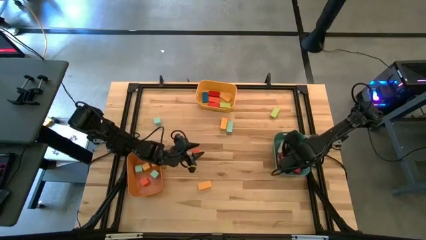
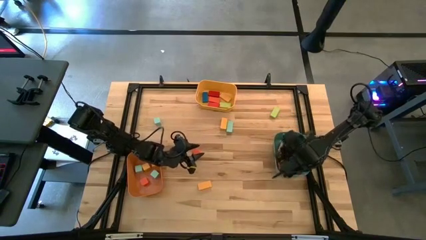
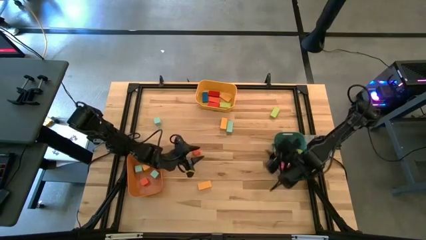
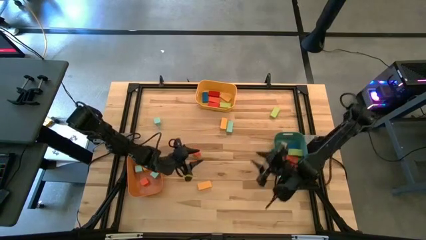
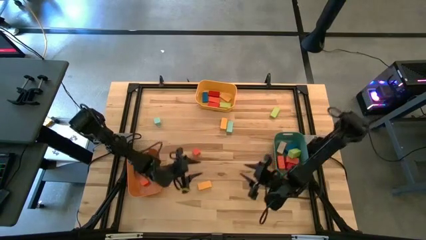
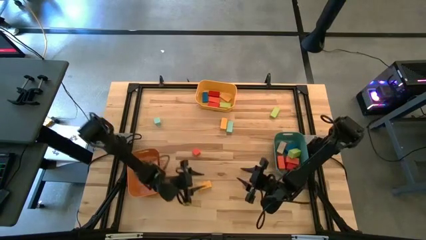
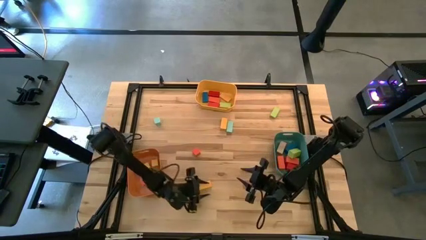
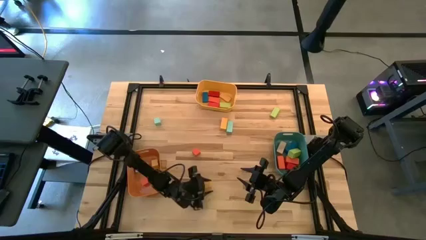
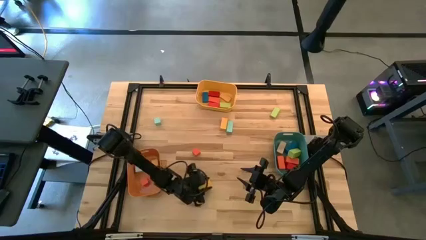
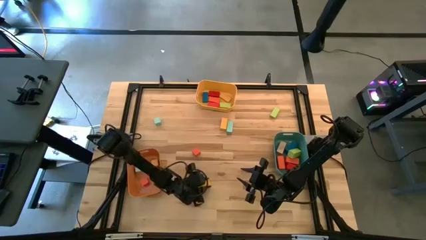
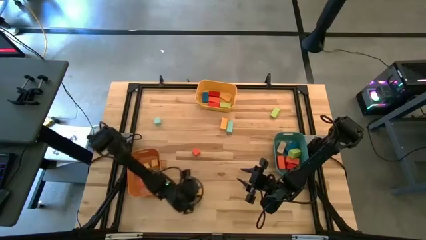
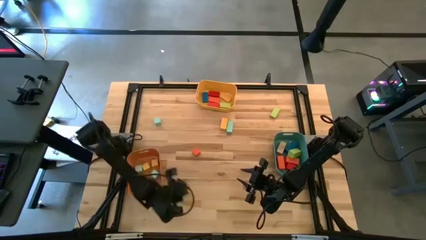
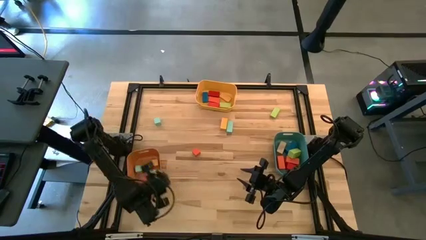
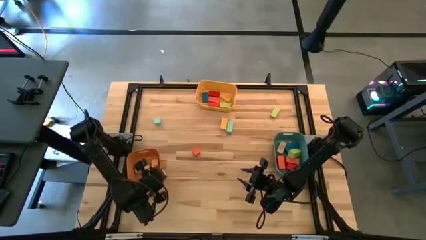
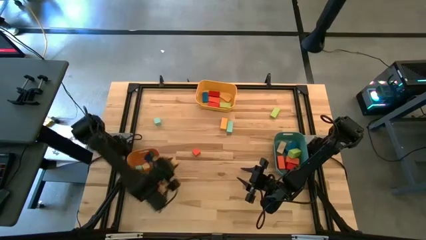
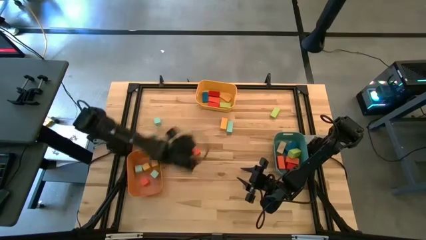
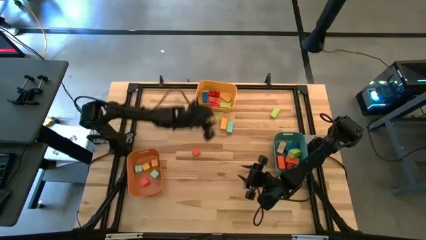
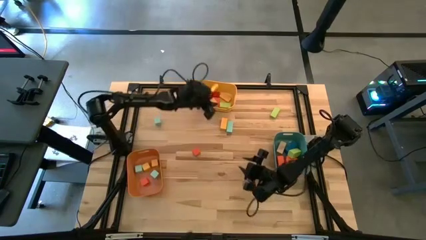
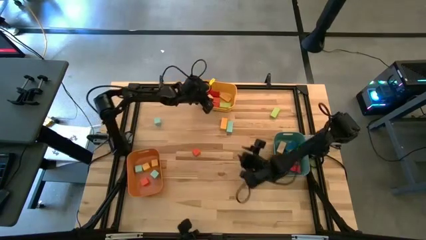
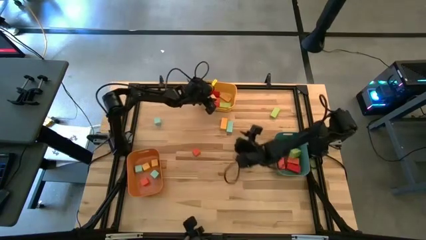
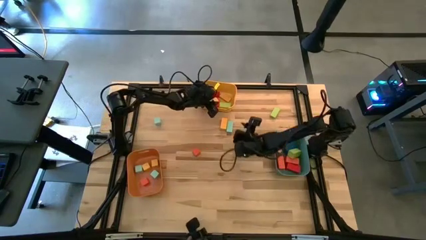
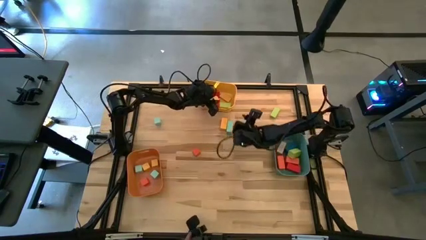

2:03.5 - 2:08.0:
Task: Sort blocks by size
Put the thin yellow rectangular block into the yellow bin

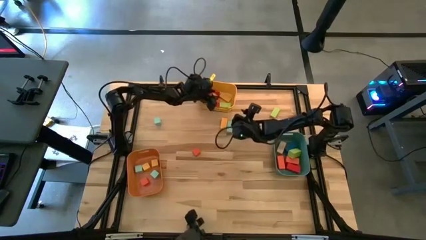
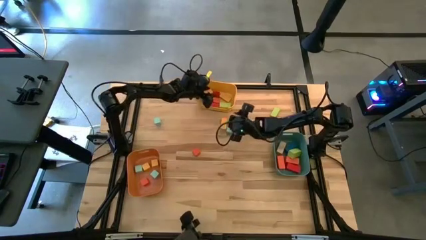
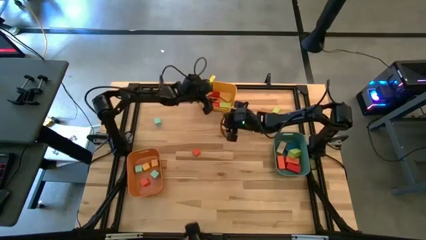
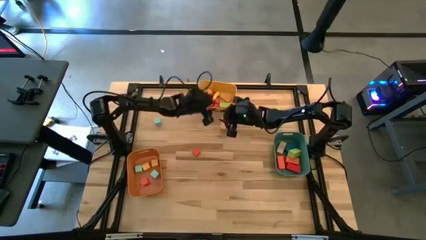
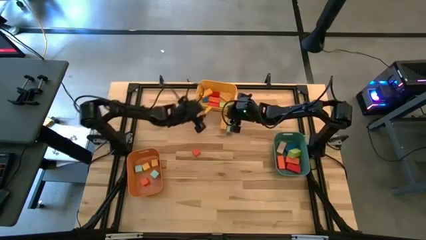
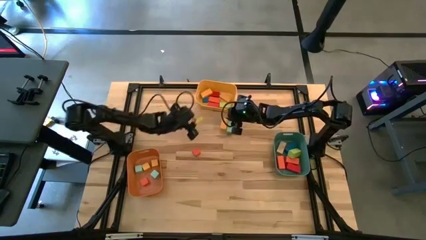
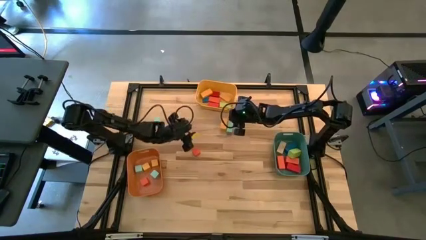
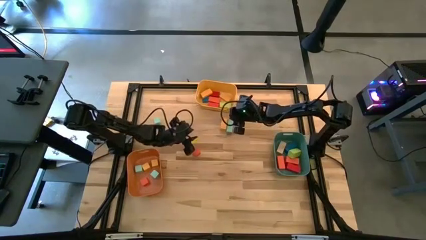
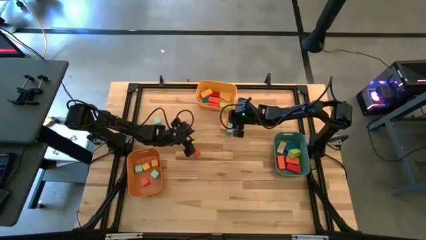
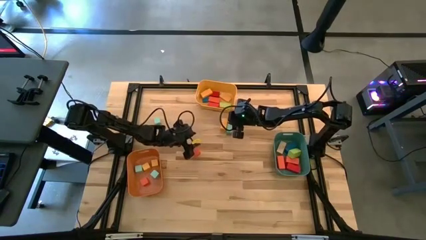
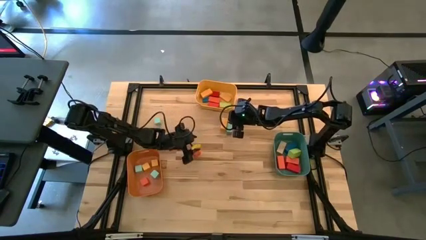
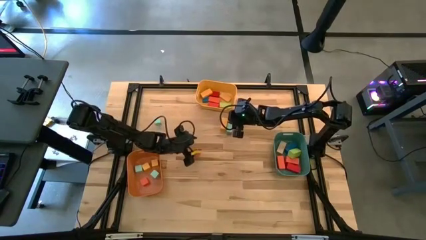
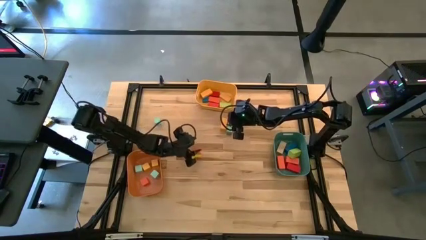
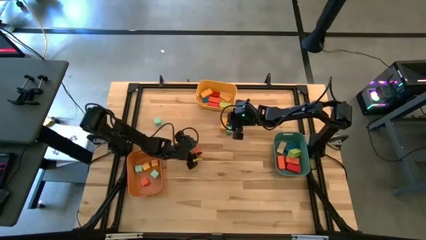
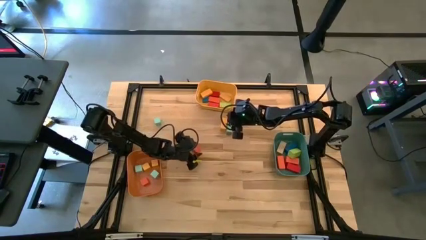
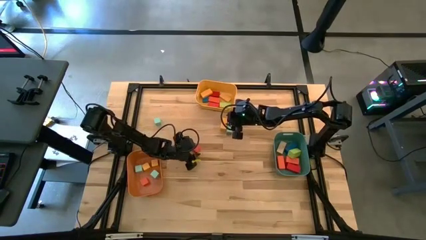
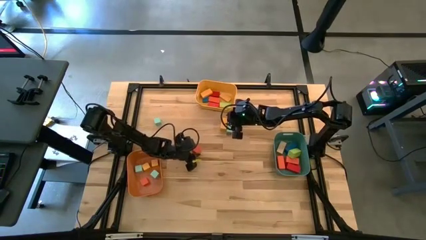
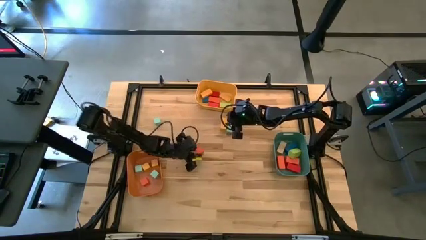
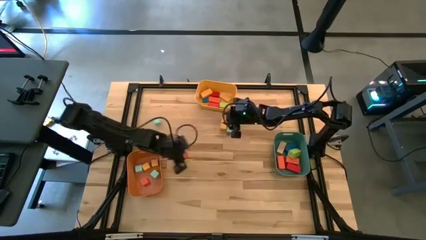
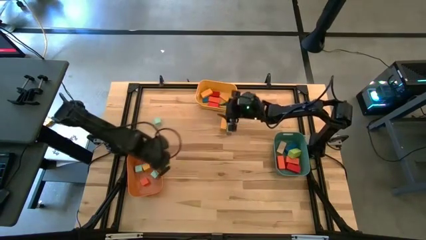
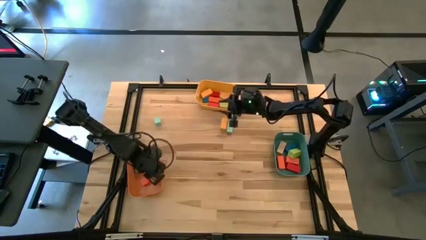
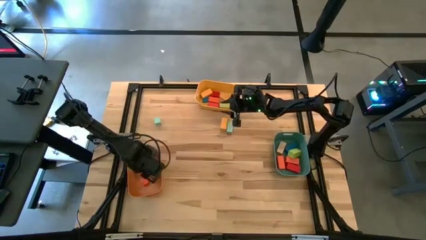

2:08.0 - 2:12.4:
Put the orange square block into the orange bin

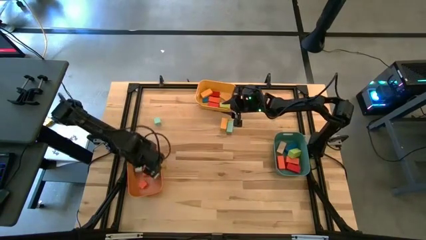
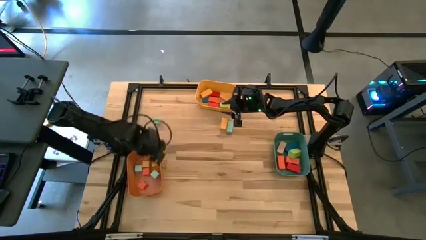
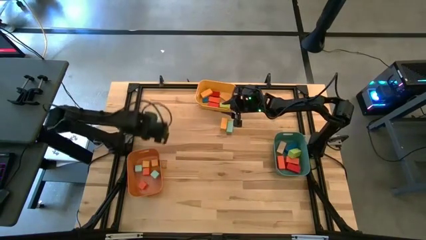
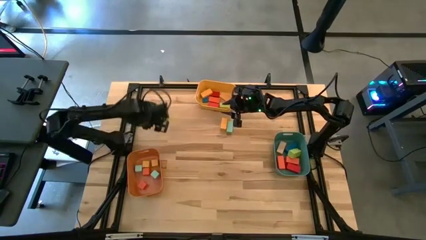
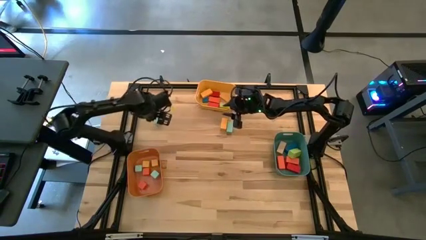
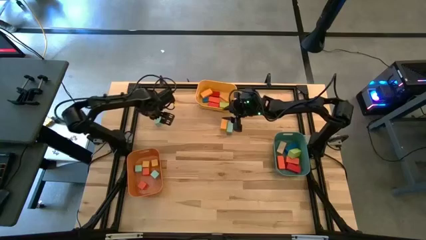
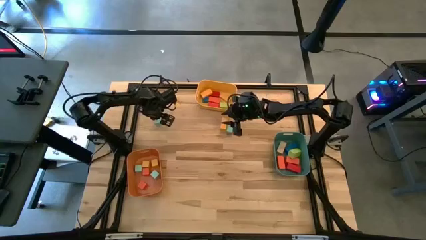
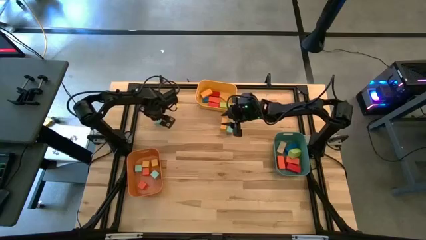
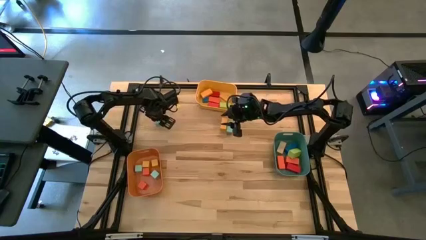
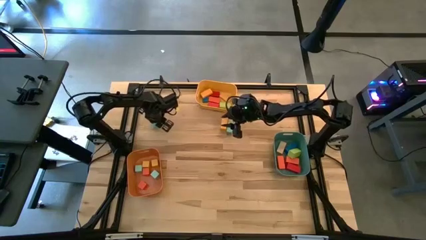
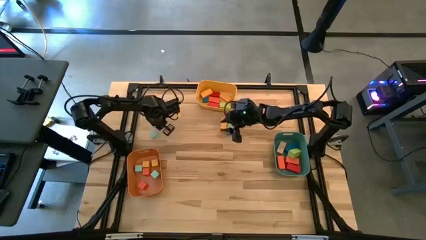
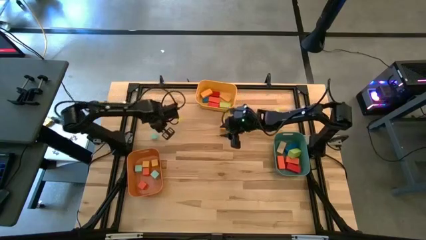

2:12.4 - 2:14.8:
Put the light blue square block into the orange bin

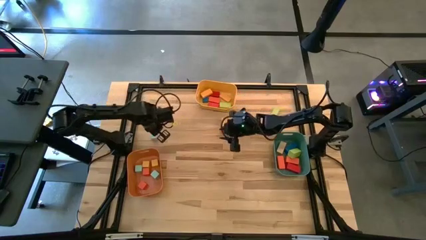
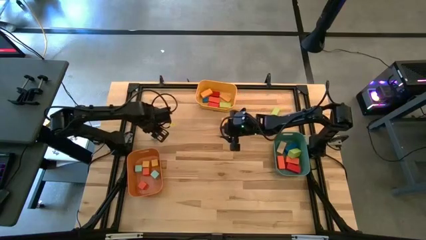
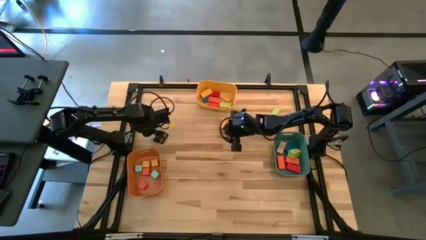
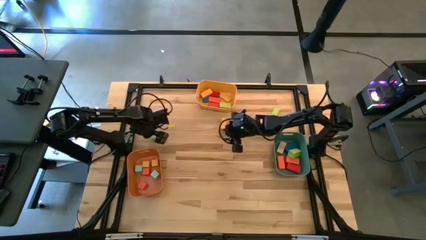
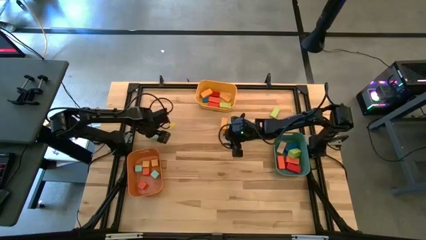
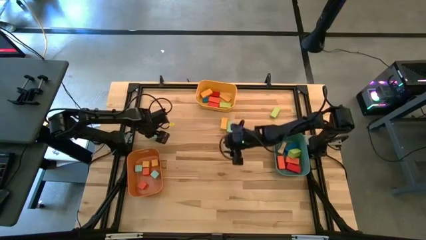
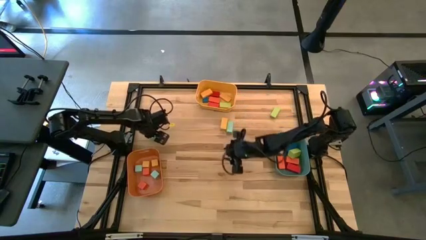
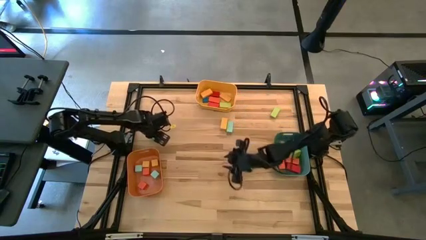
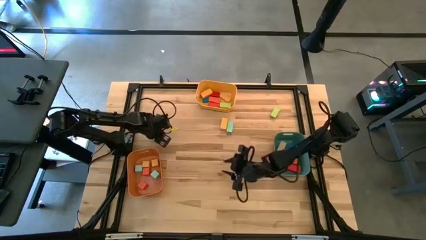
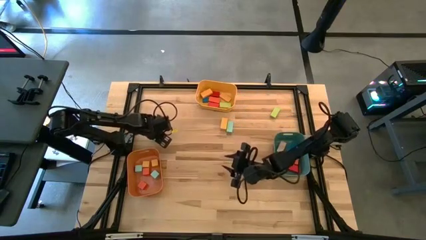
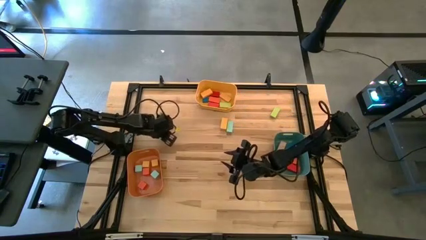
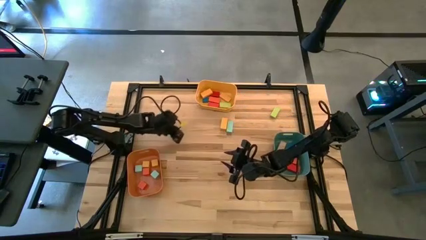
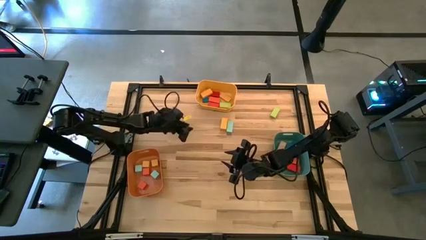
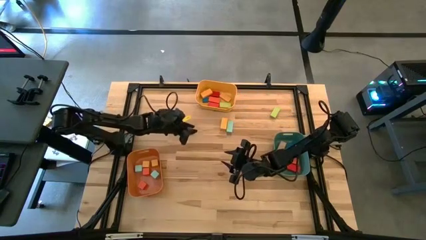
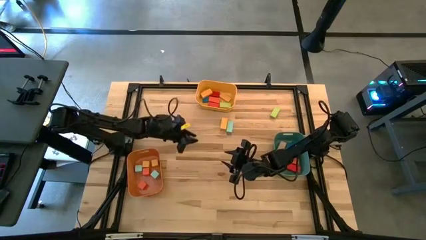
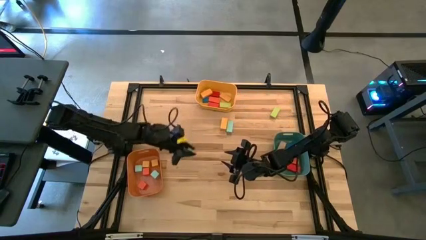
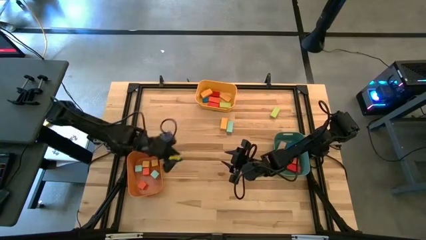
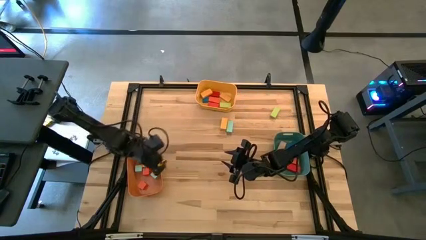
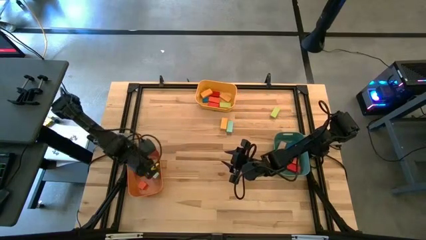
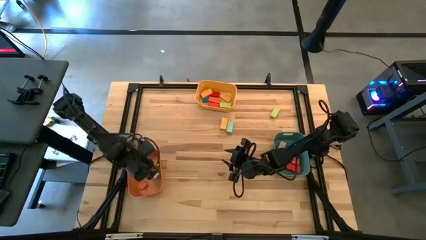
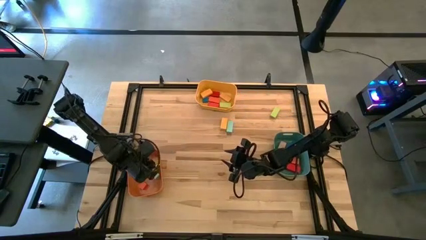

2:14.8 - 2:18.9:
Put the light blue square block into the orange bin
